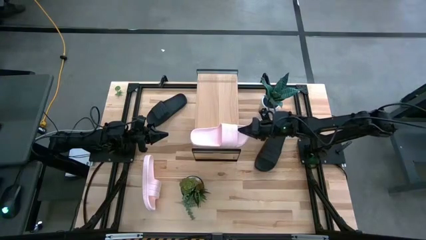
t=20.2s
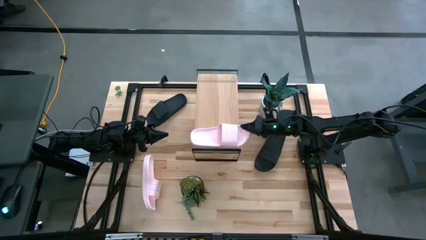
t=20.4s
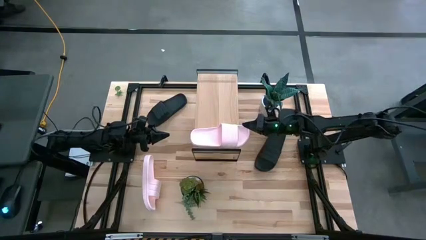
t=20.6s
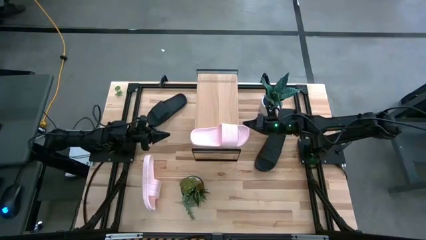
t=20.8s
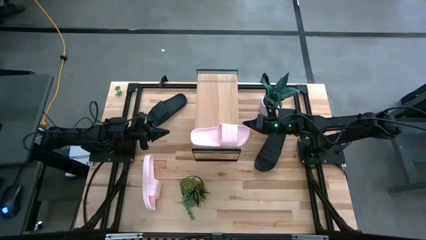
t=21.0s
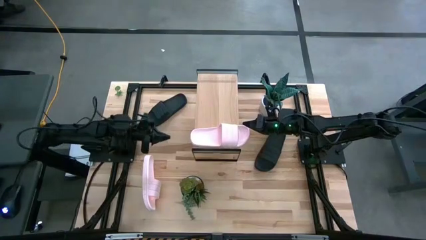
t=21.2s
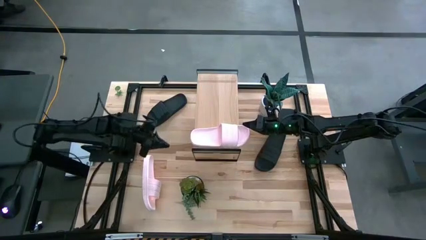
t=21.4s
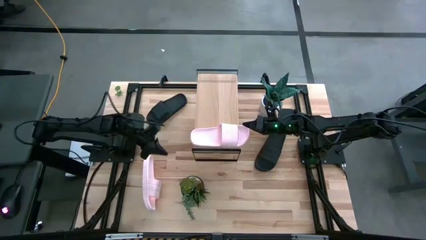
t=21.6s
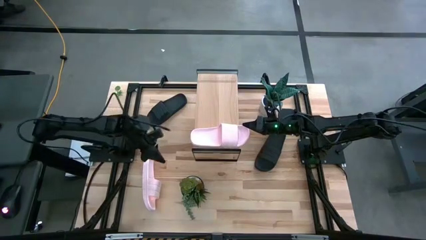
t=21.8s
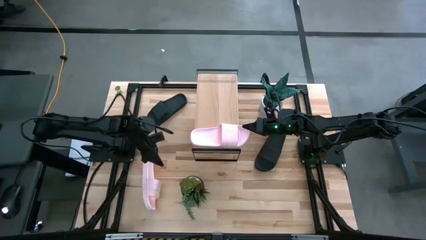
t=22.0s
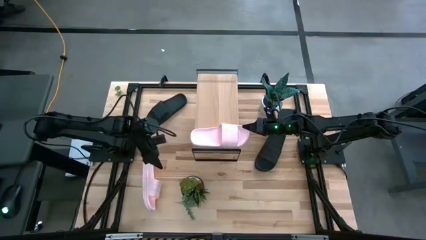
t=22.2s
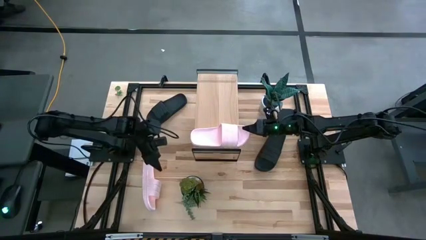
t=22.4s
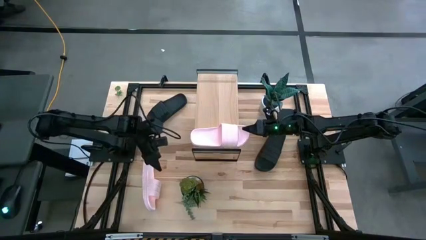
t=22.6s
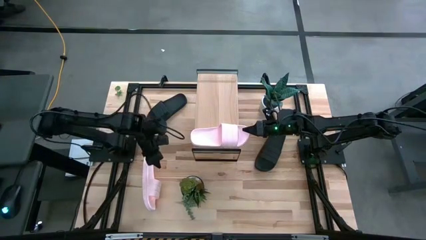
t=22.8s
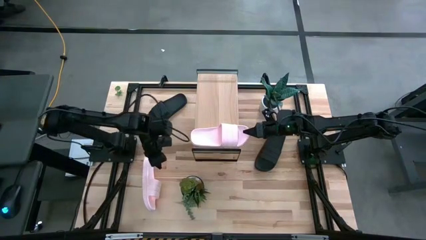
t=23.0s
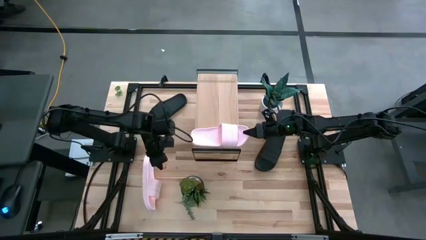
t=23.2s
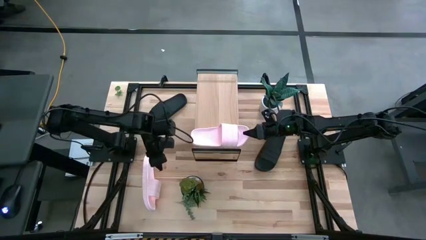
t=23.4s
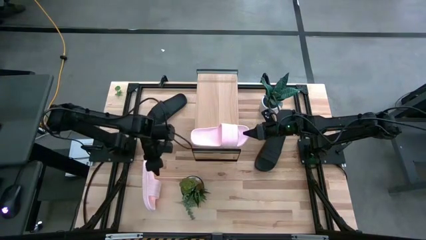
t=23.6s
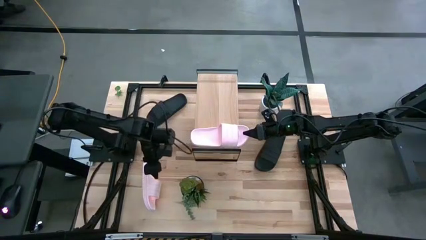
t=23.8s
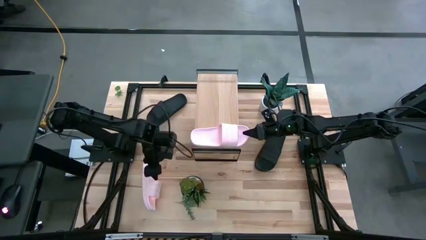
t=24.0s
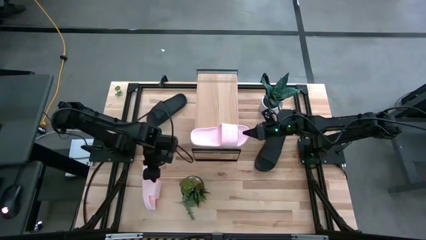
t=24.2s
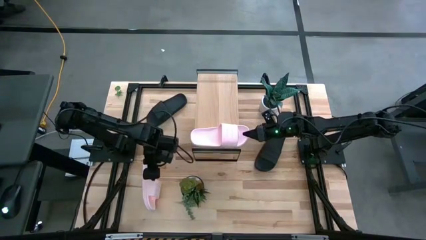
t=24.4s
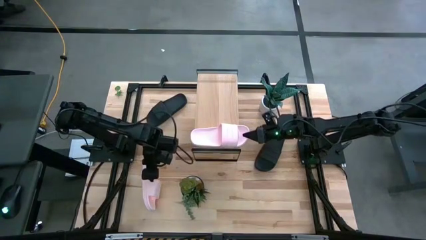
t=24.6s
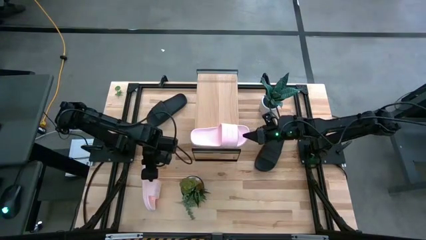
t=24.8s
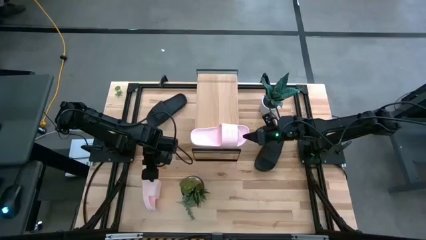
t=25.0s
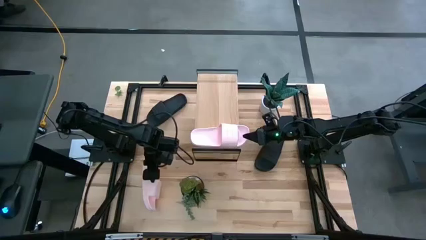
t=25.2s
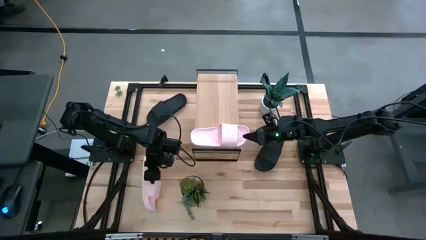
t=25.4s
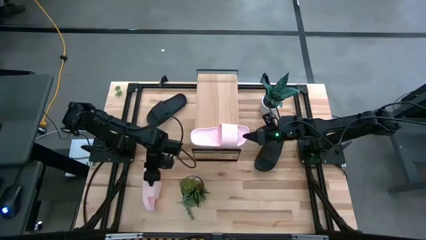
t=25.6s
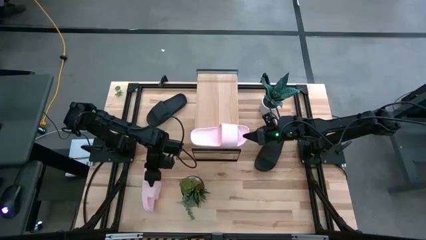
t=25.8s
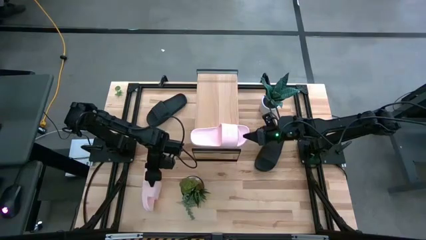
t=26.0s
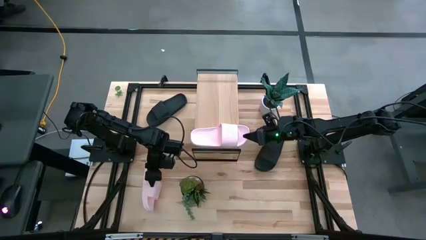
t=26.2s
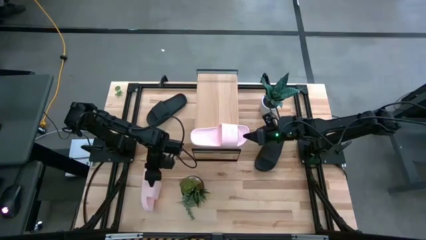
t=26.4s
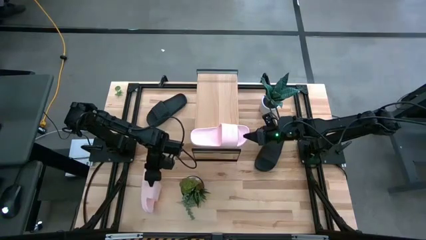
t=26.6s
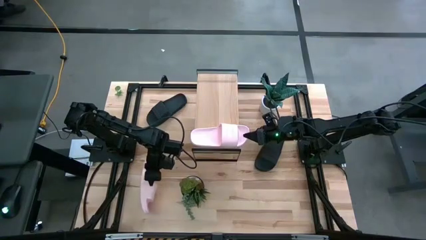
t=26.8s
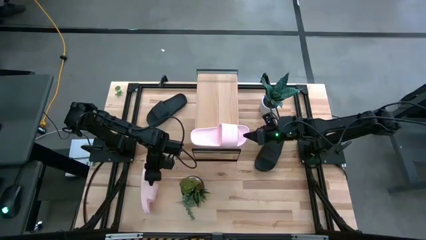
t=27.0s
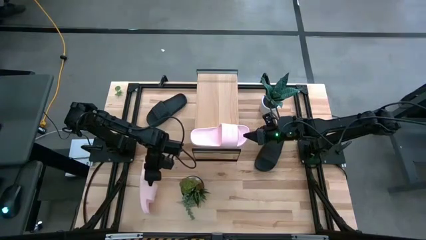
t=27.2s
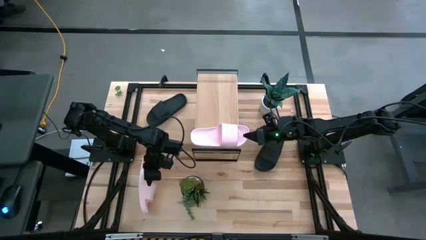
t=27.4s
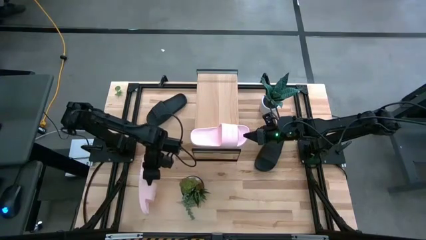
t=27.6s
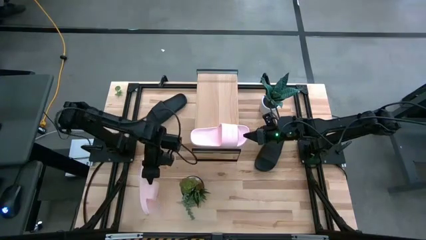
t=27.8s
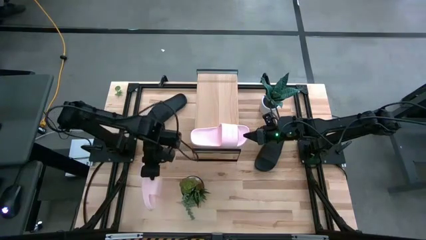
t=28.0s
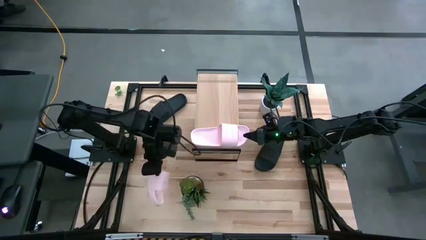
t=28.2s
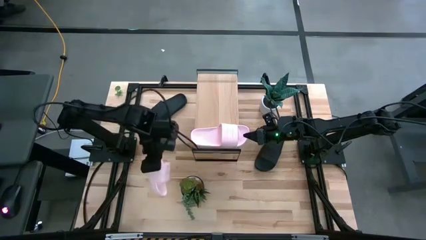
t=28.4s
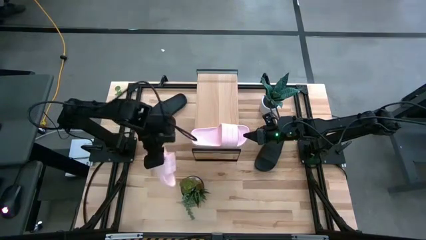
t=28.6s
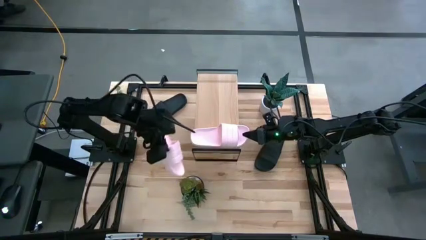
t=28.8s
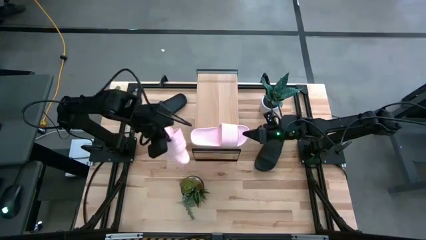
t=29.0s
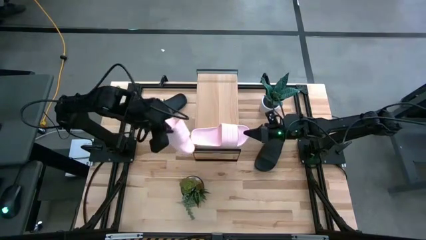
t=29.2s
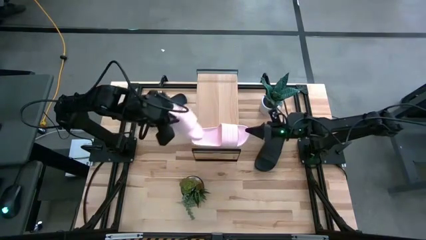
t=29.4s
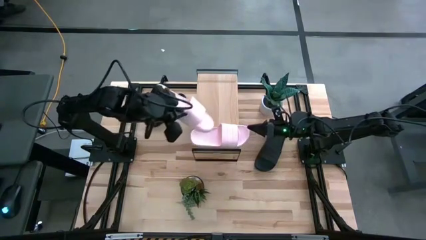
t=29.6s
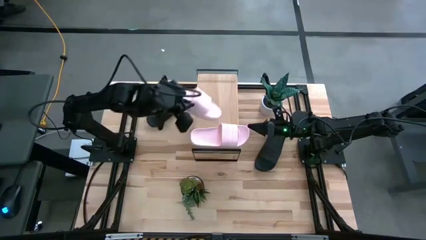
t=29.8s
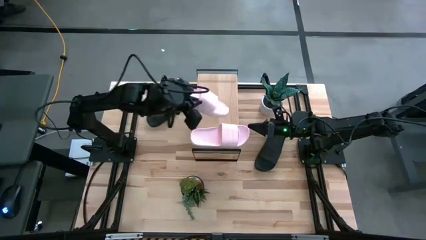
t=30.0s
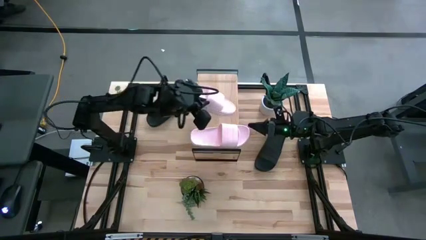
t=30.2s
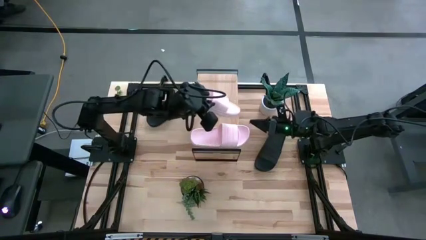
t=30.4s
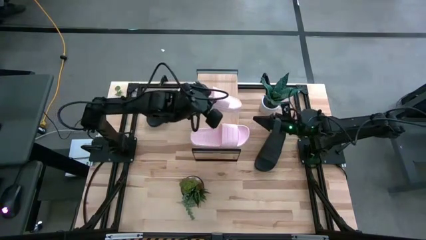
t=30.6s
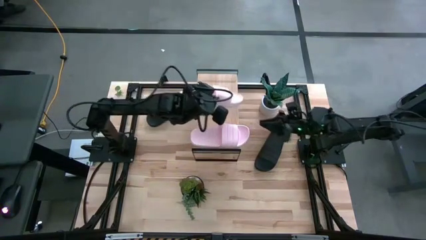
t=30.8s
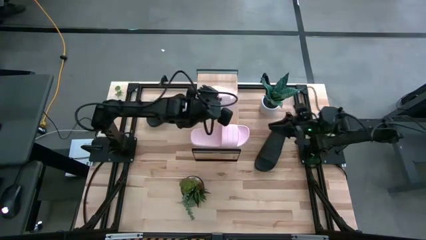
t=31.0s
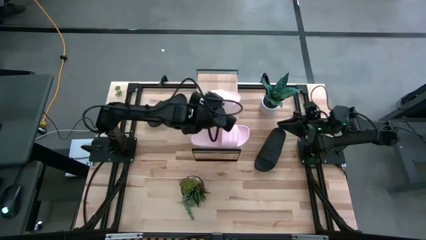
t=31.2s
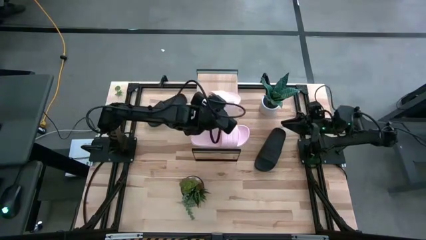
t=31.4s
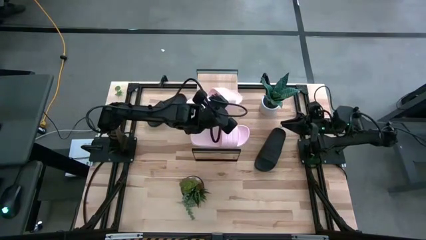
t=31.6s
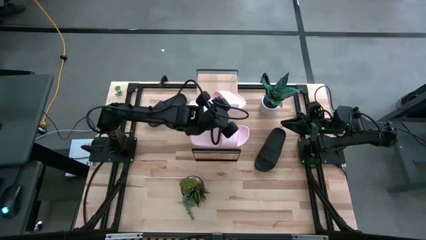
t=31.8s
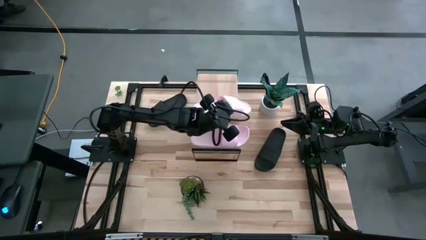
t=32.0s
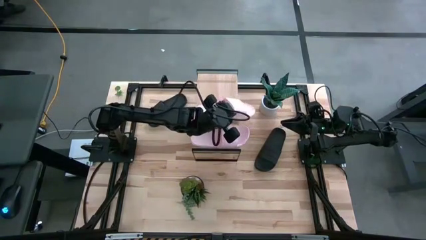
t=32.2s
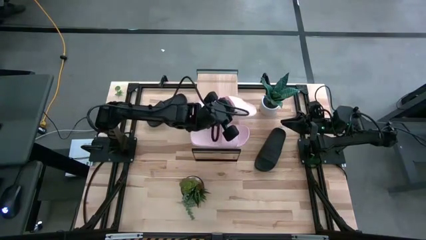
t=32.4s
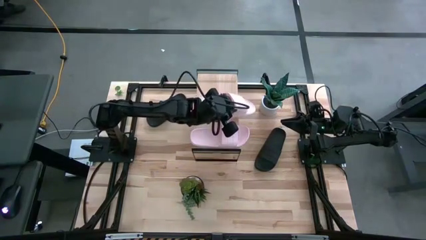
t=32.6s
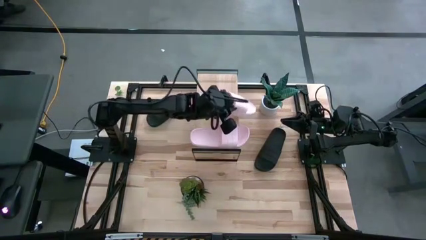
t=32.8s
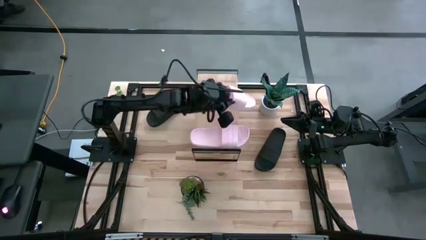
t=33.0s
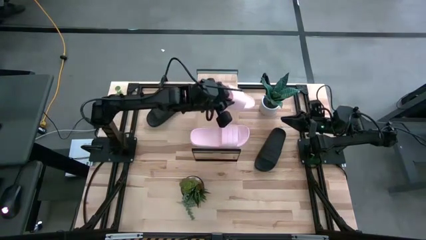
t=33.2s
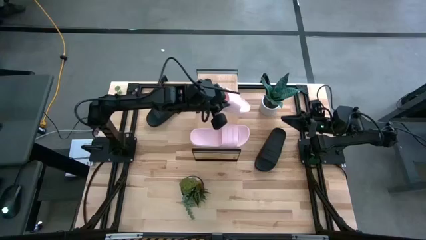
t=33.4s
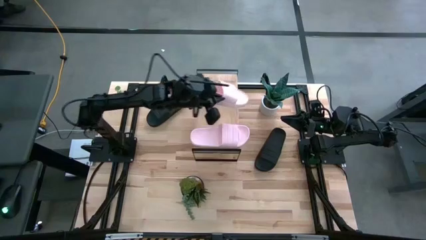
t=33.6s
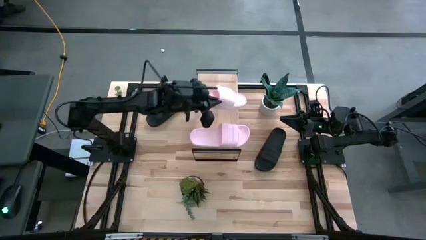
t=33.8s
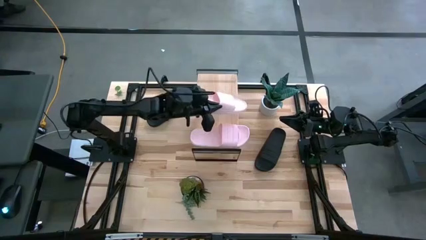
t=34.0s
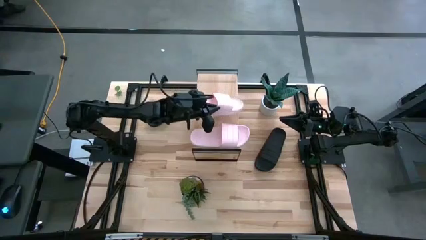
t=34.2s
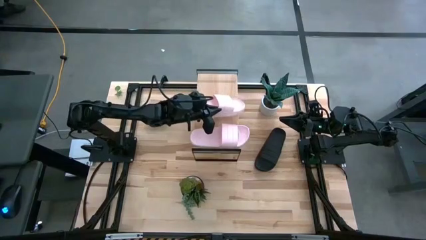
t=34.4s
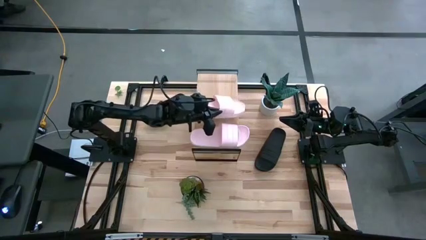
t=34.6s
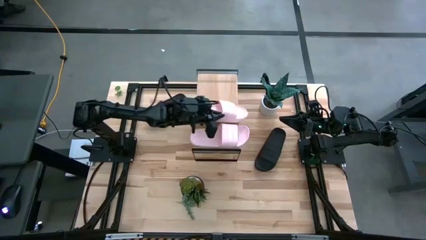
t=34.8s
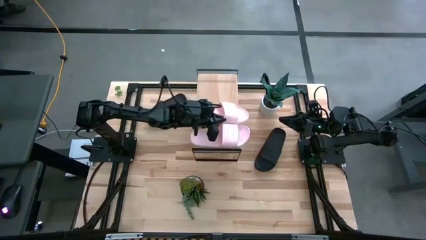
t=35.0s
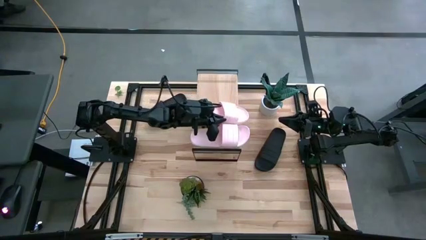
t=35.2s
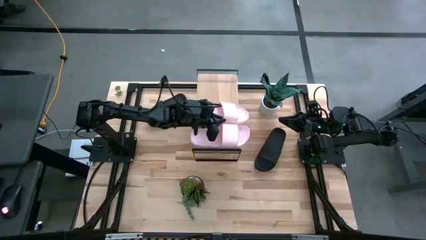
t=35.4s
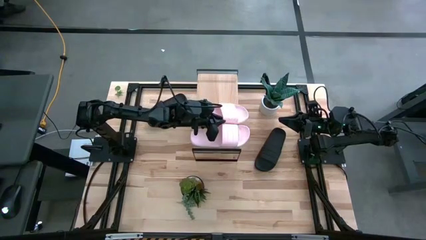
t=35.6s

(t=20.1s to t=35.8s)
Task: Pick and place slides into the shelf
Put the pink slide on the shelf
